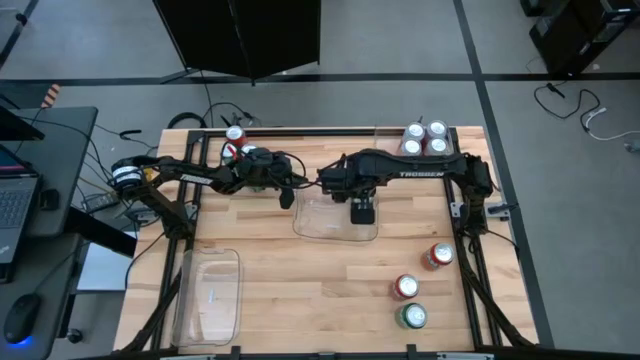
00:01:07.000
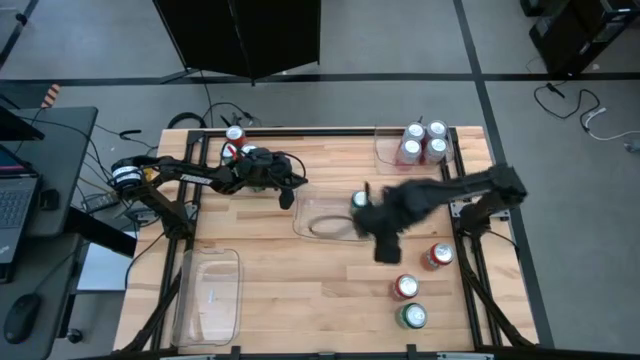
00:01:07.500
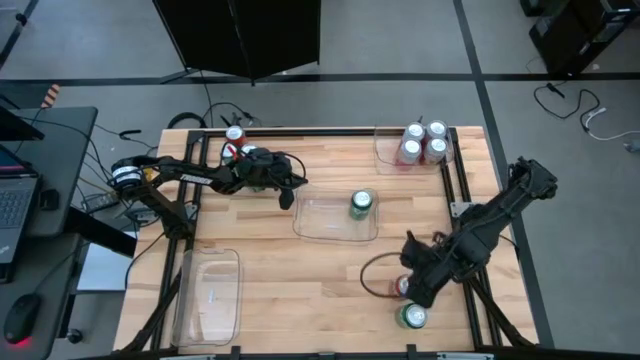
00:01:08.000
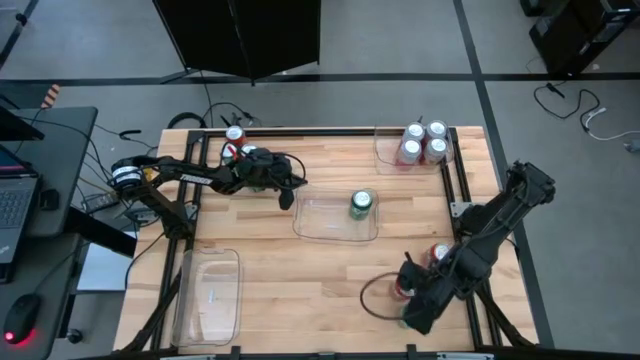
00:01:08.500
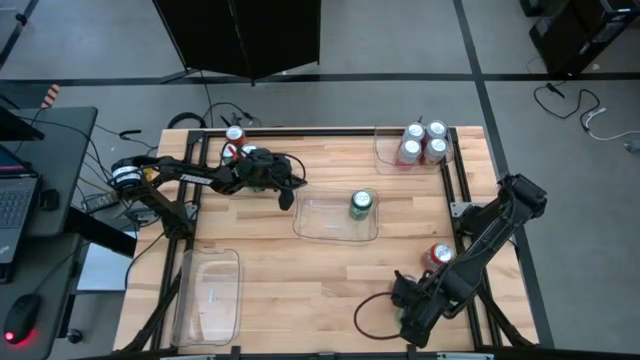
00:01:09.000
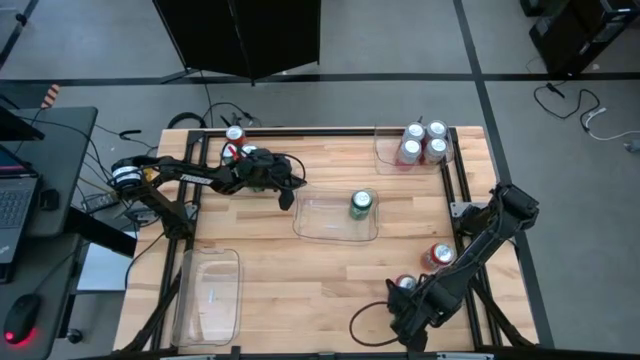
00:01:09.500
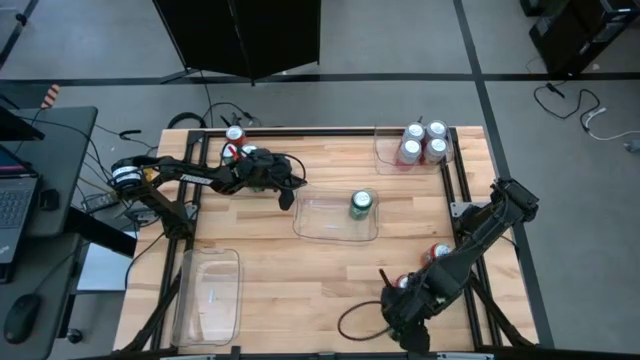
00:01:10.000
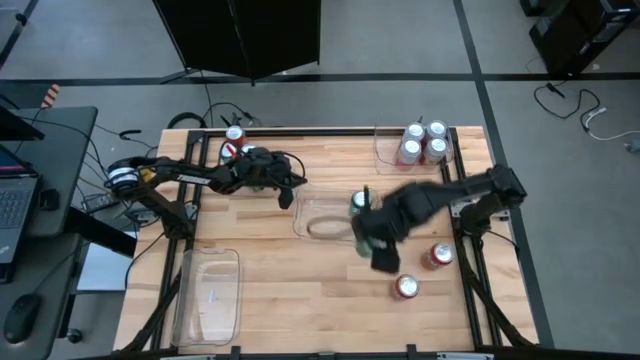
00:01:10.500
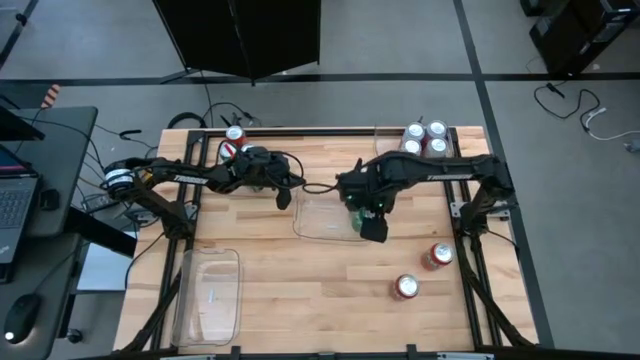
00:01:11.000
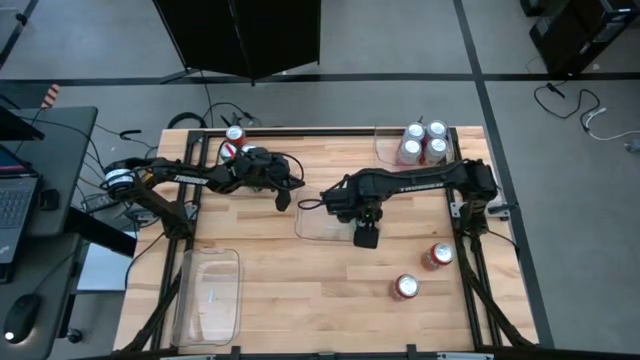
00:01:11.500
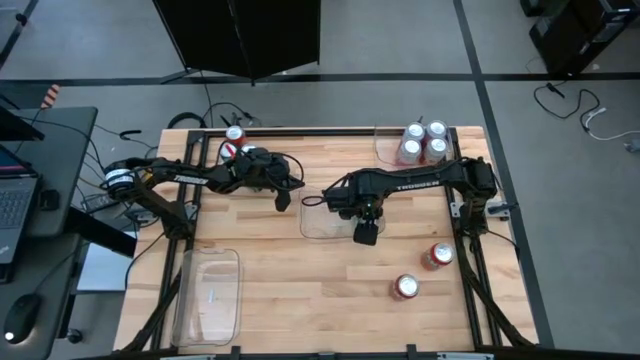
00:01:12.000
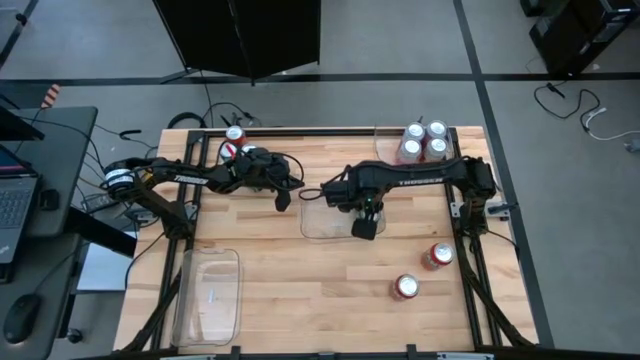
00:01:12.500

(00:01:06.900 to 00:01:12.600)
Task: Sort soda cans
Put the bottom green soda can into the middle transparent bin

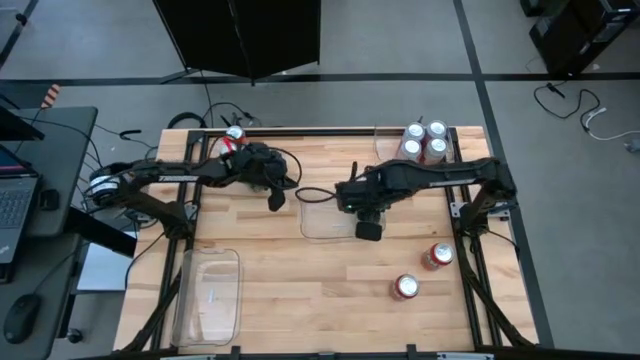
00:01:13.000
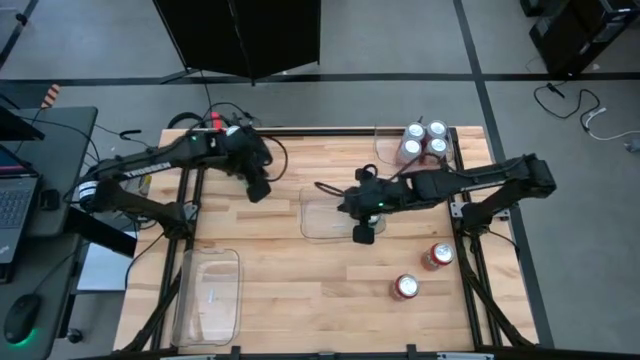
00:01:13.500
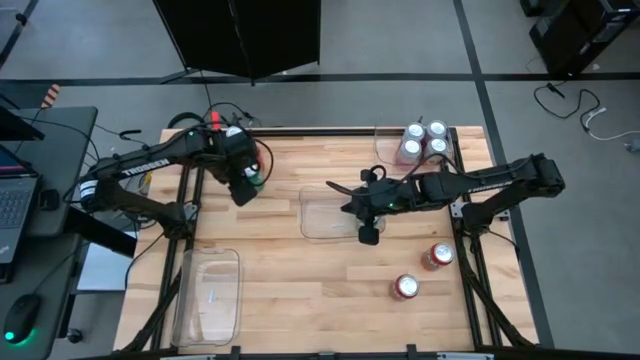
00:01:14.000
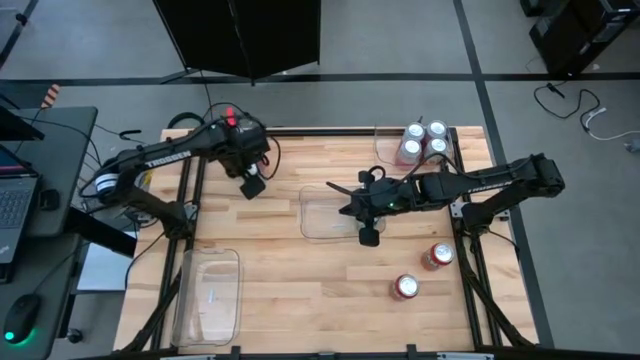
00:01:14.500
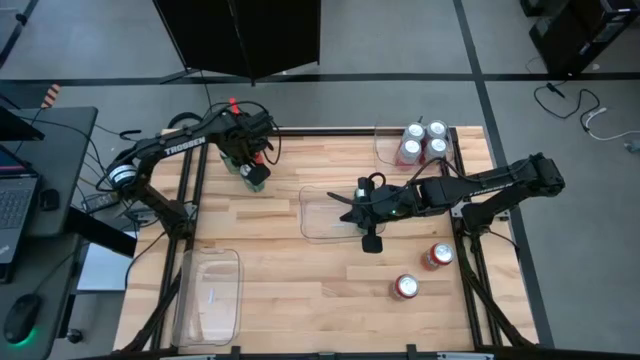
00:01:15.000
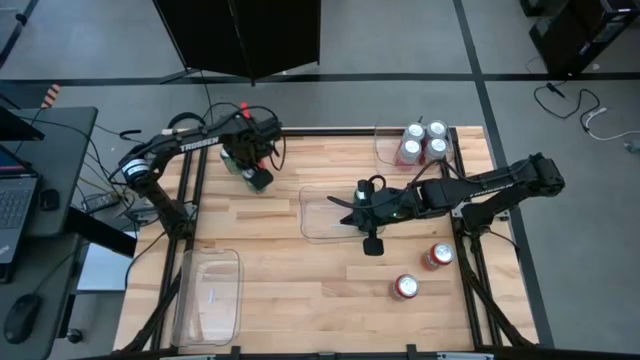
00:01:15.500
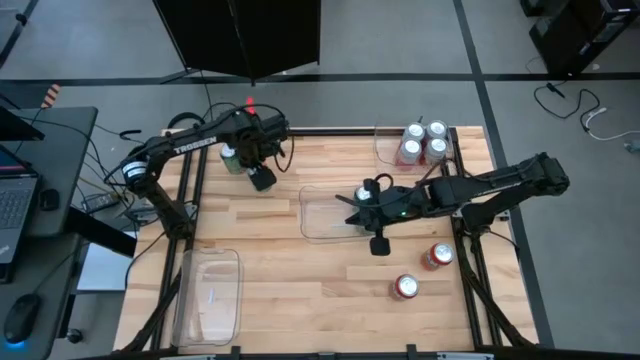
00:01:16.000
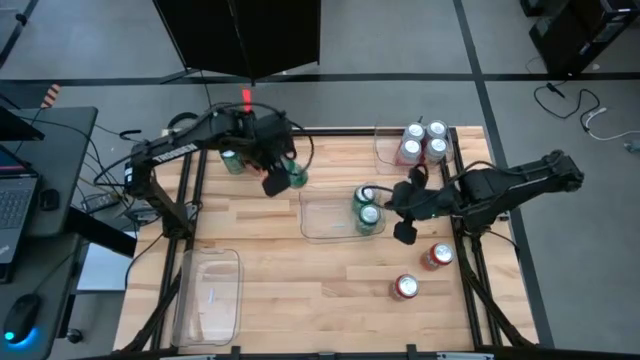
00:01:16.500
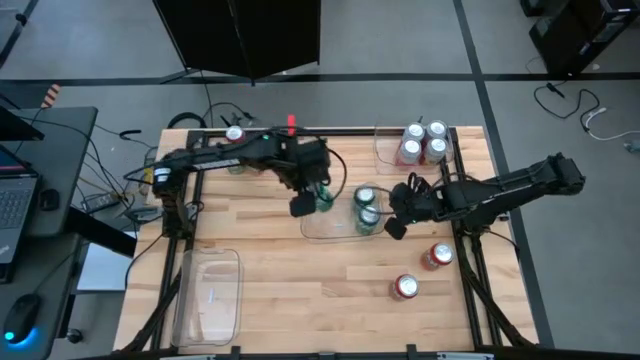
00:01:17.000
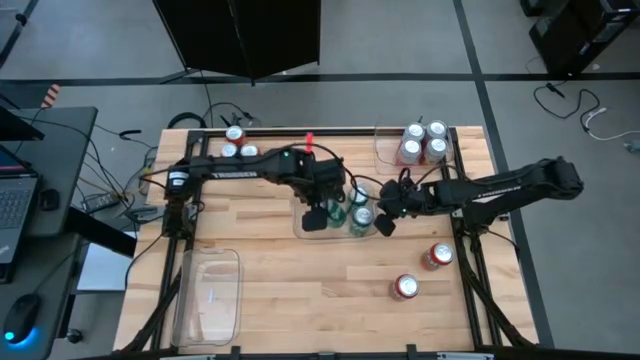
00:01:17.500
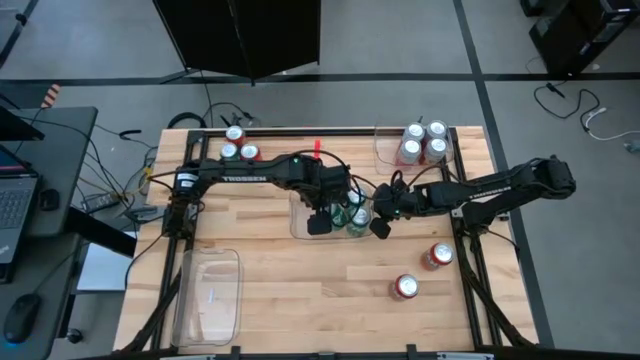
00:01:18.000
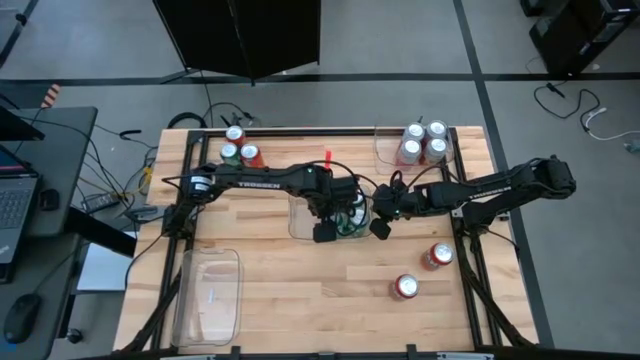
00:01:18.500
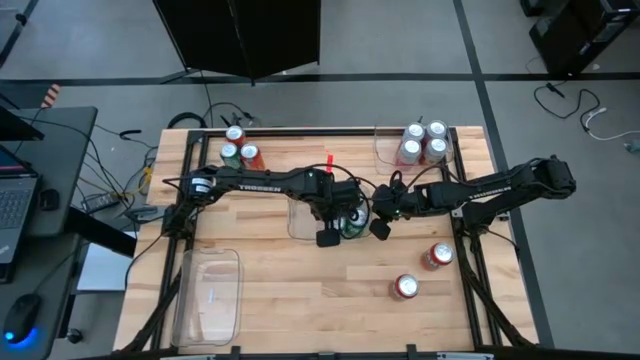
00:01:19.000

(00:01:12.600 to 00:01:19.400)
Put the bottom green soda can into the middle transparent bin

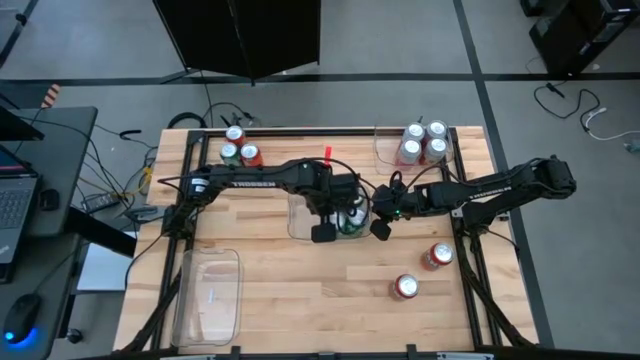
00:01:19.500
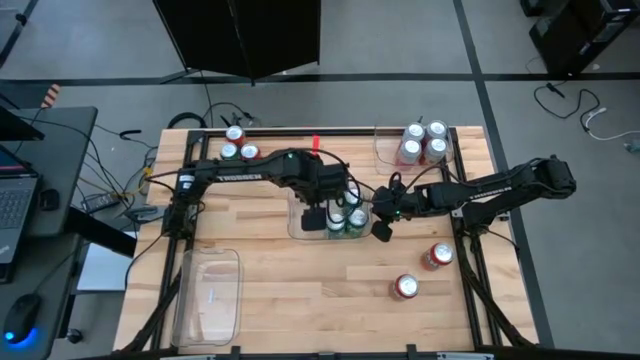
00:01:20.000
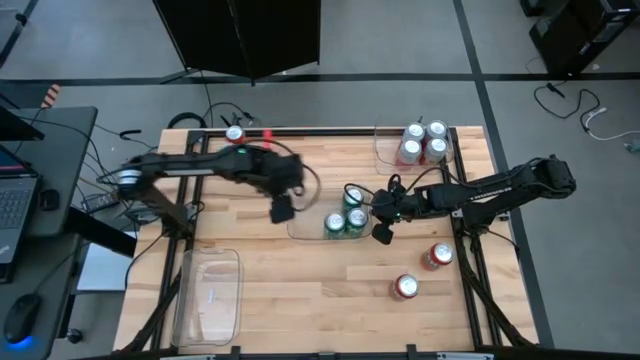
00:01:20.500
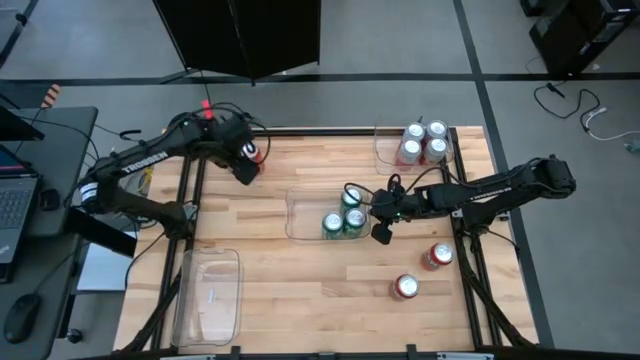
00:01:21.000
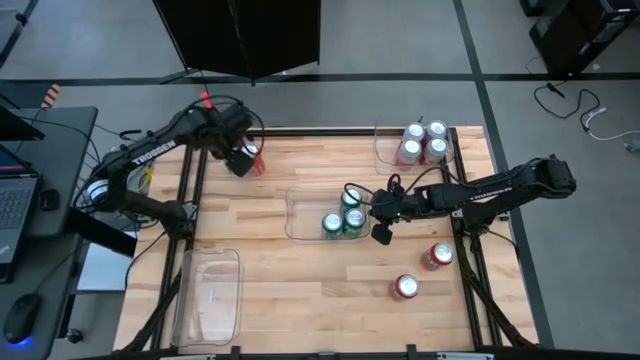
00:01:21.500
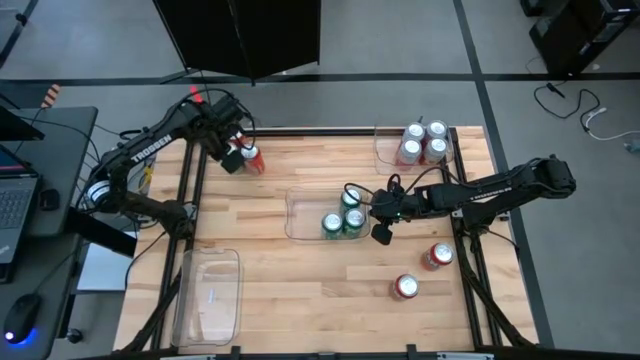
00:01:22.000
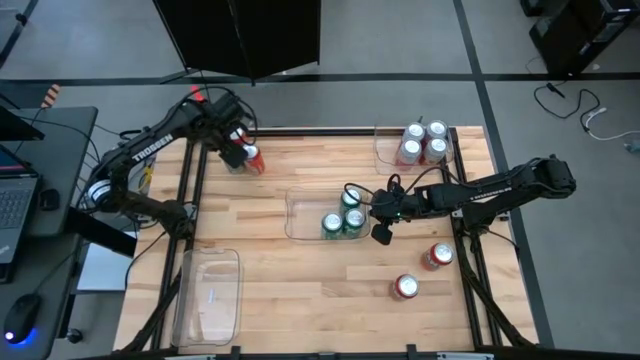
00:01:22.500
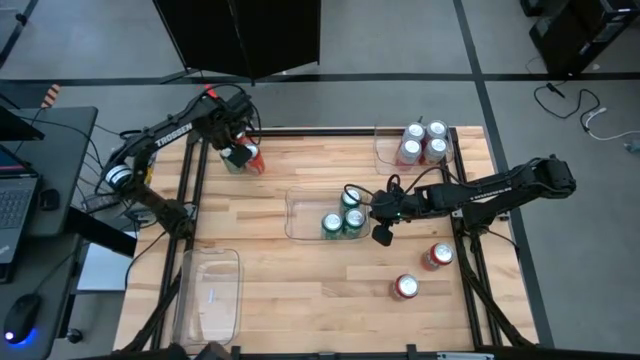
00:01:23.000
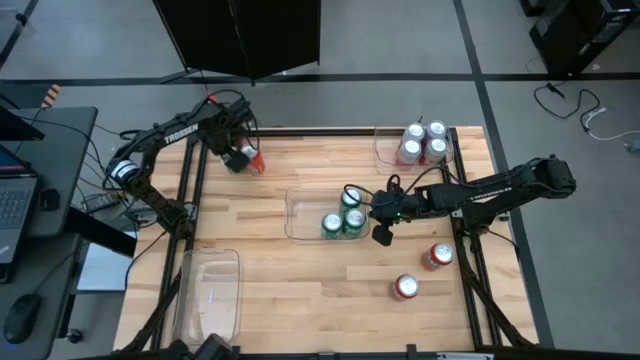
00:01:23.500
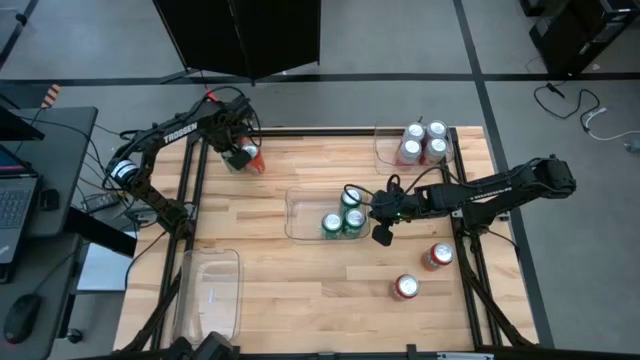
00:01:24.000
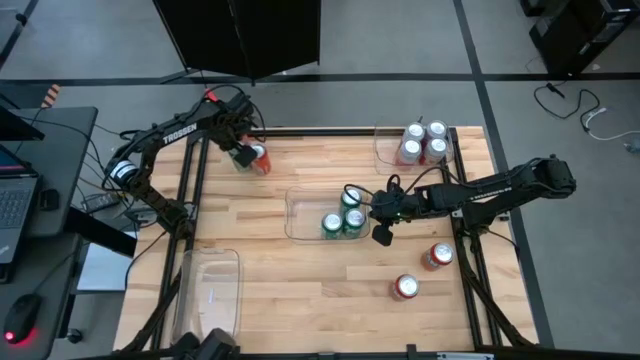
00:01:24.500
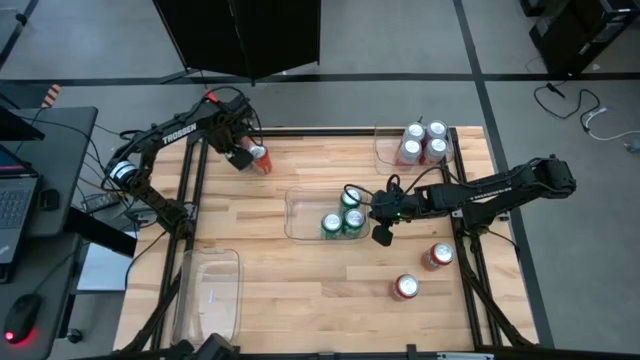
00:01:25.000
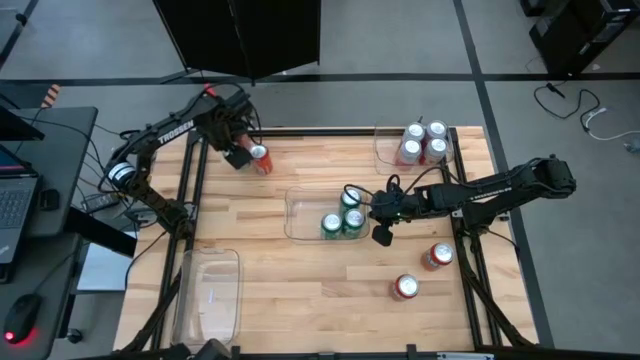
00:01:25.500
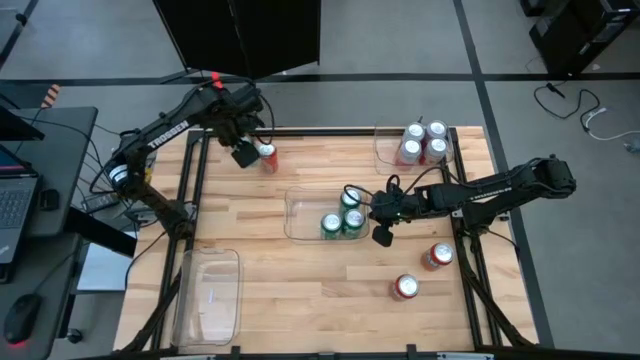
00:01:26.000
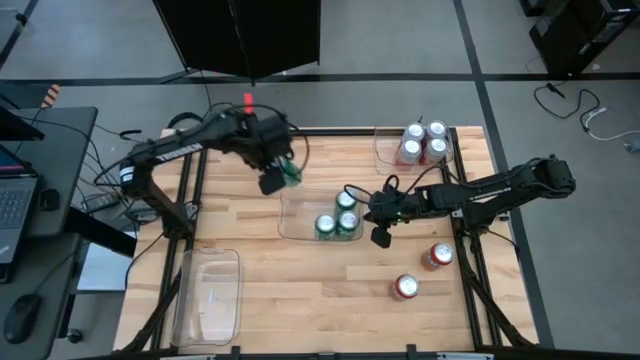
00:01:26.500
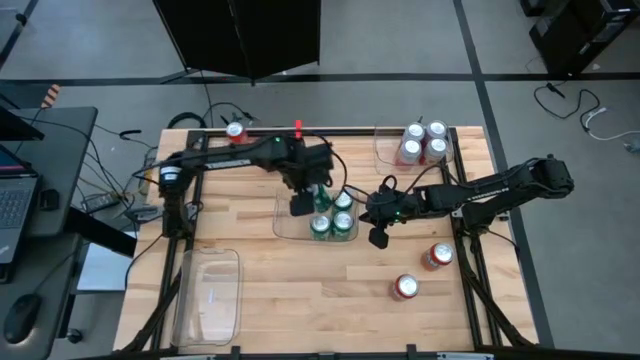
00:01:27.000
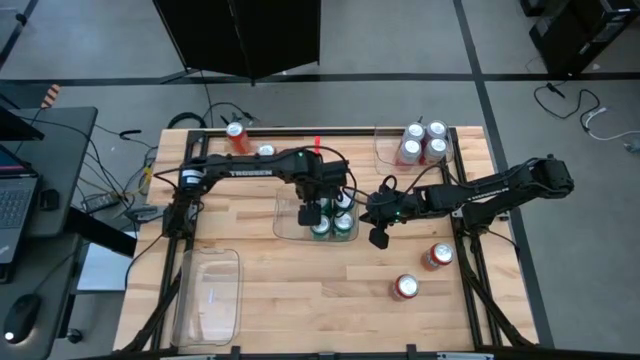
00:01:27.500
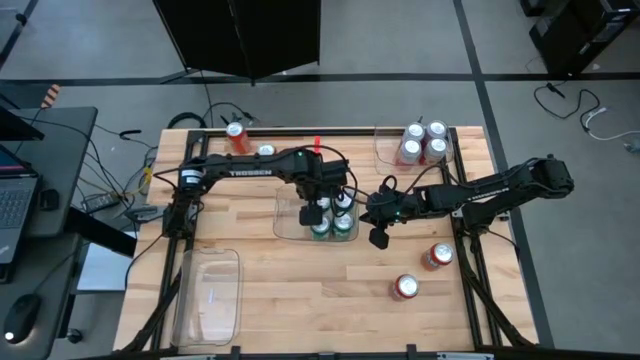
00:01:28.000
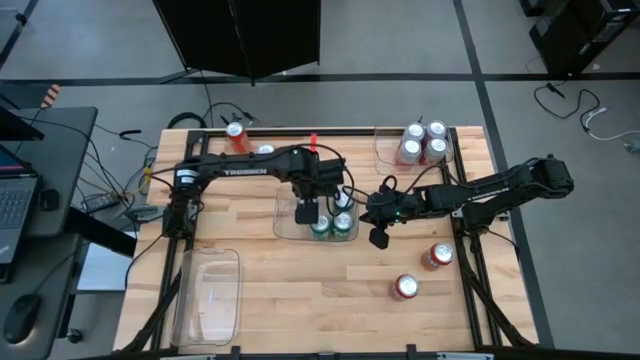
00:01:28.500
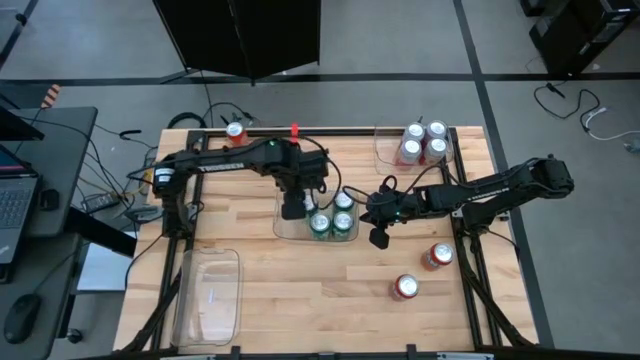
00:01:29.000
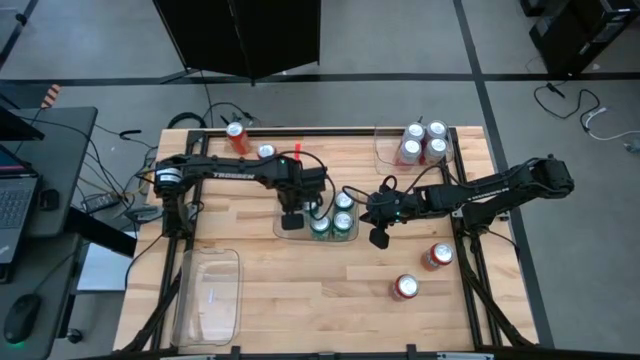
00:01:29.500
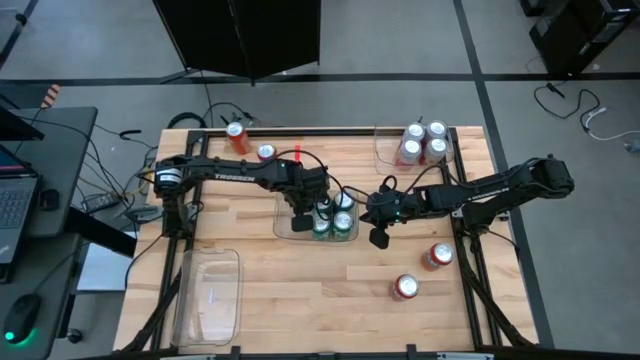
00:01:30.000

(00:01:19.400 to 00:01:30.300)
Put the green soda can into the middle transparent bin
